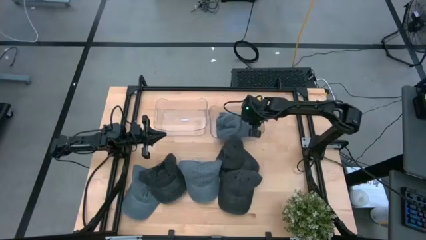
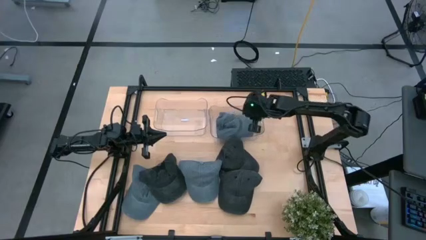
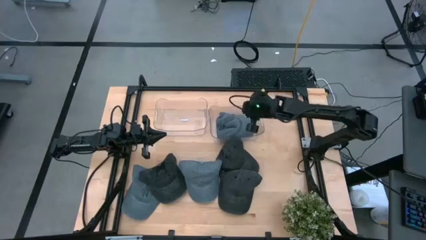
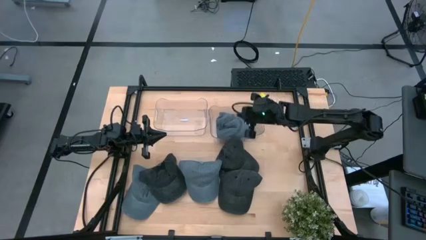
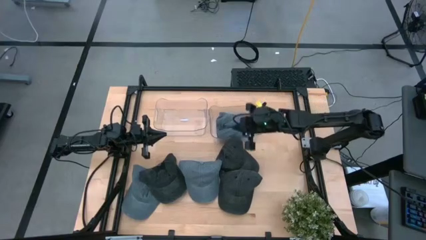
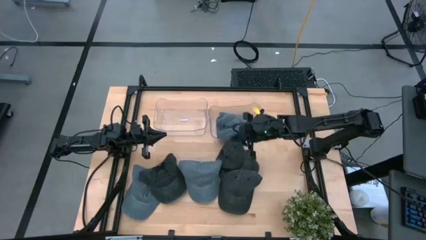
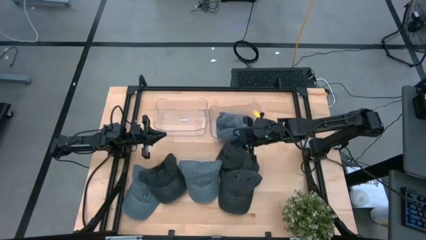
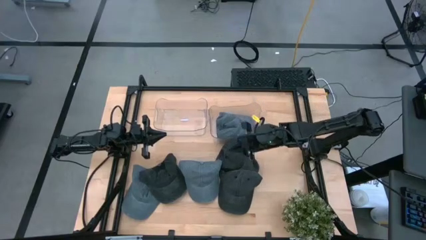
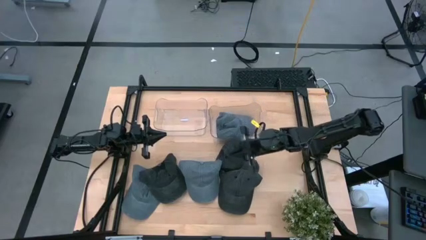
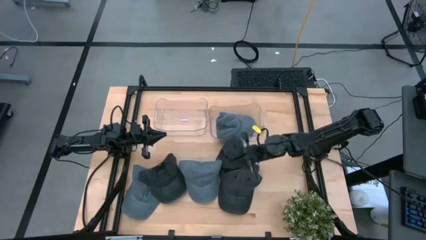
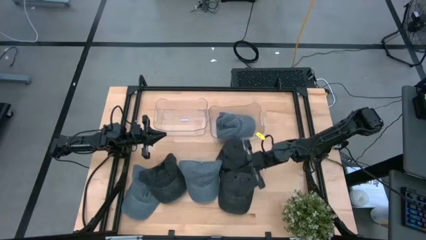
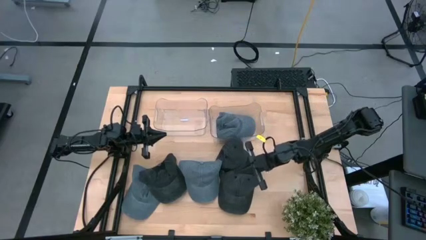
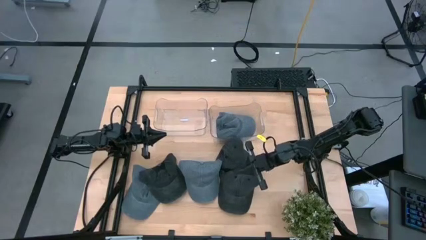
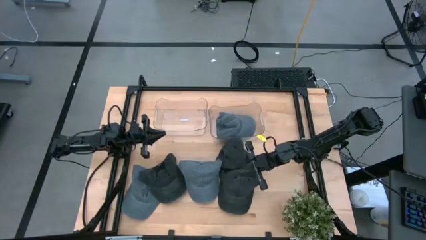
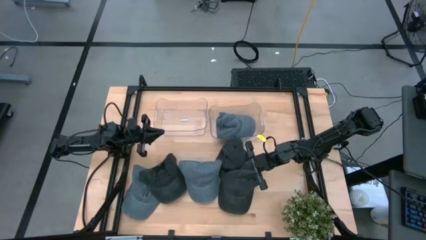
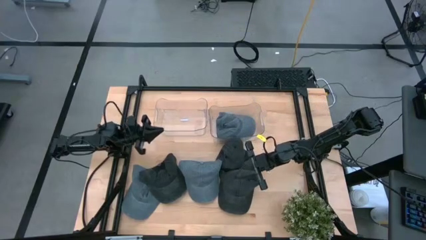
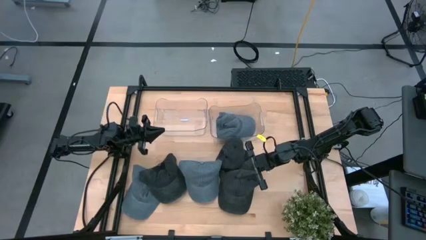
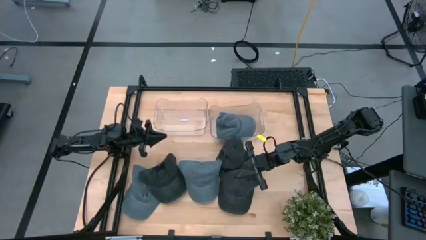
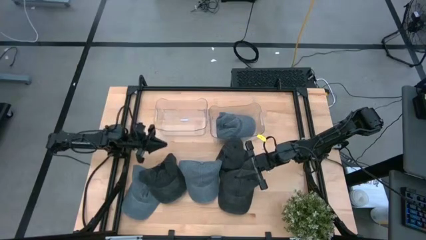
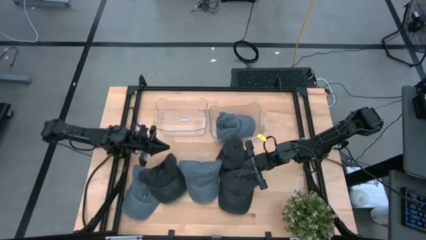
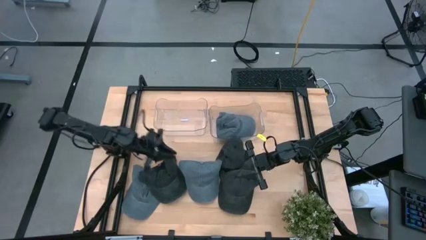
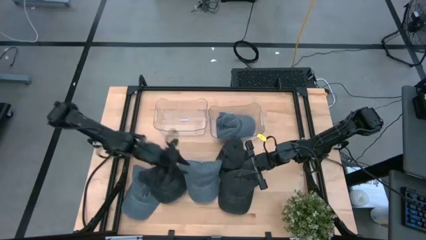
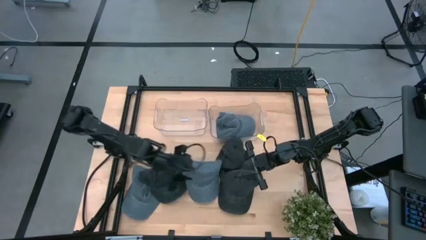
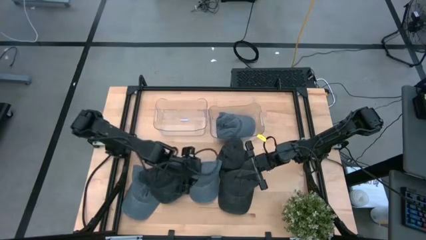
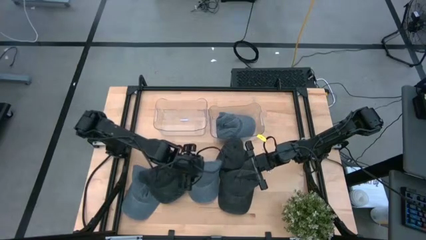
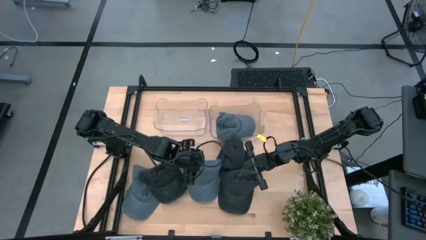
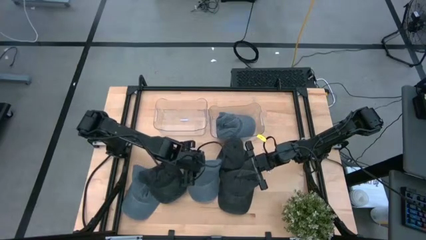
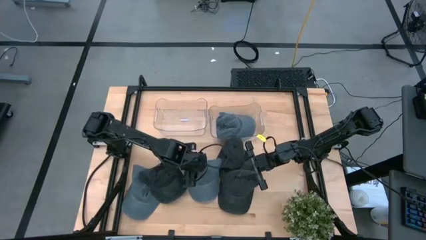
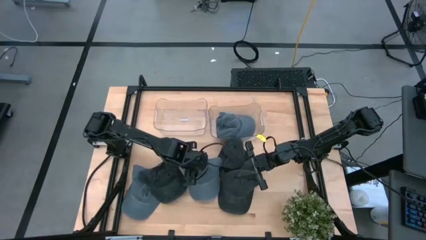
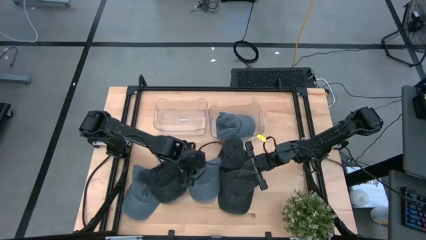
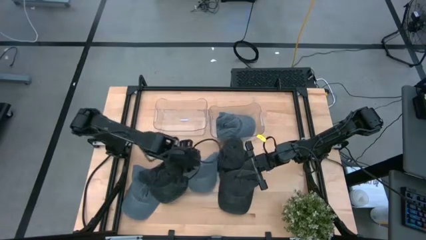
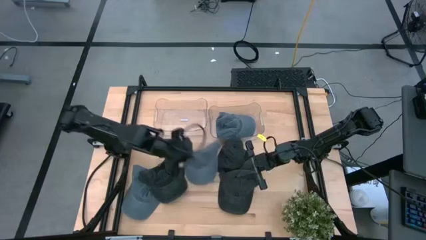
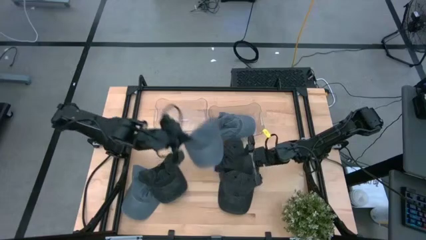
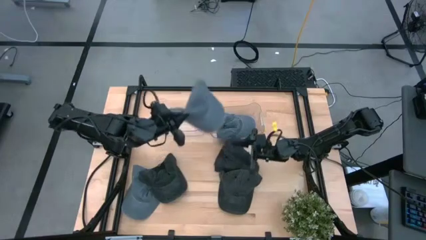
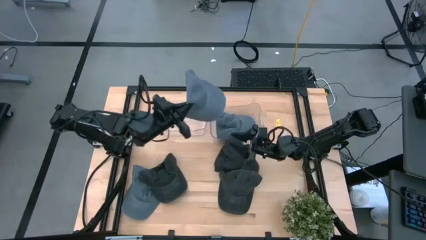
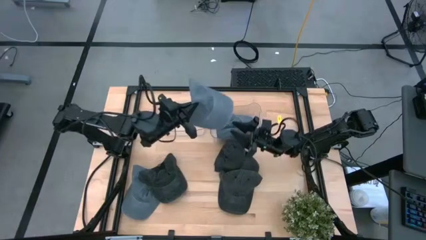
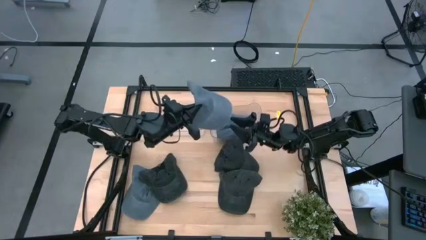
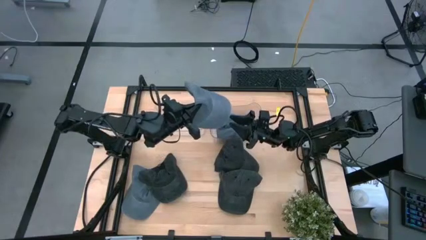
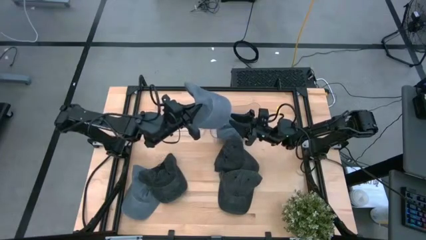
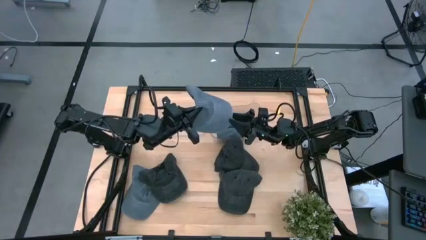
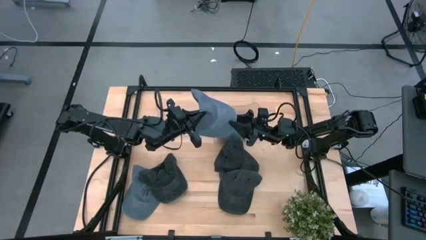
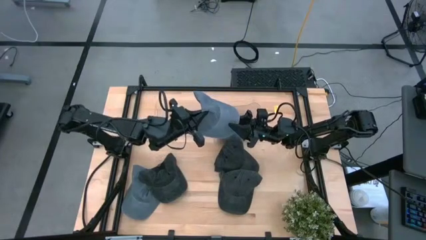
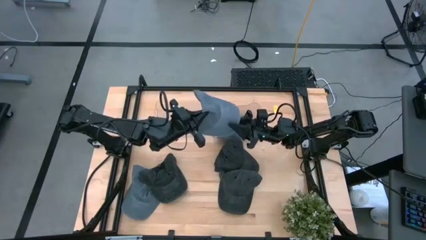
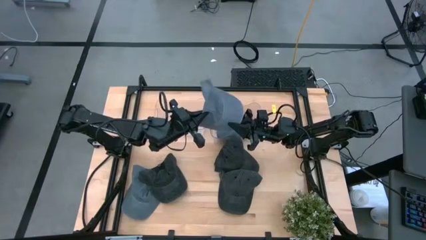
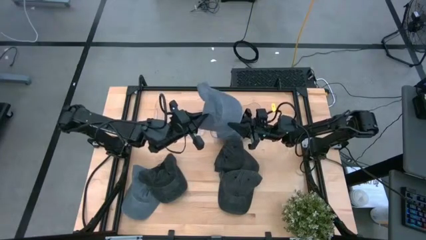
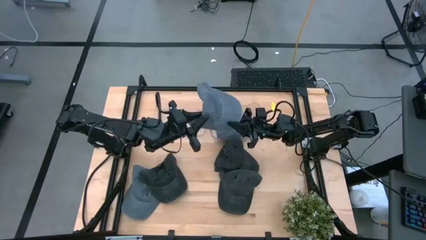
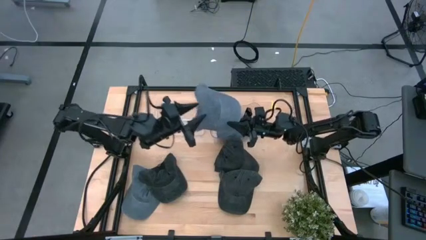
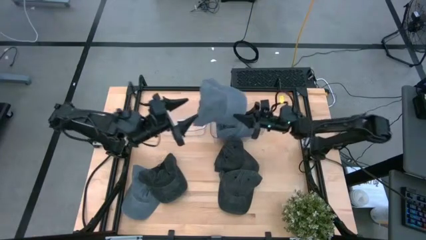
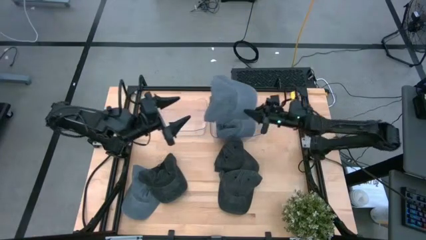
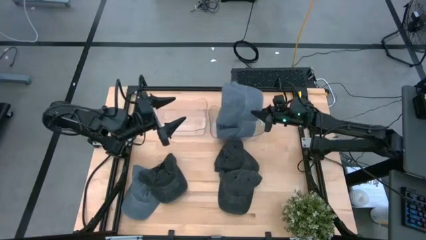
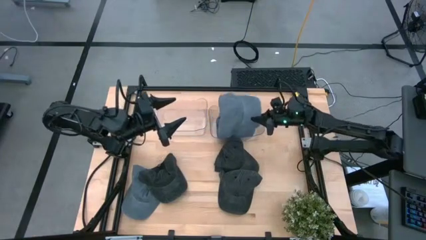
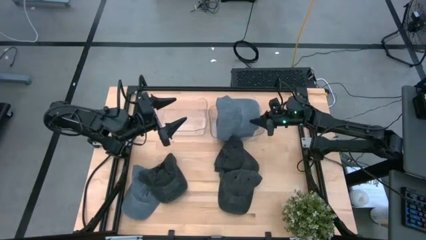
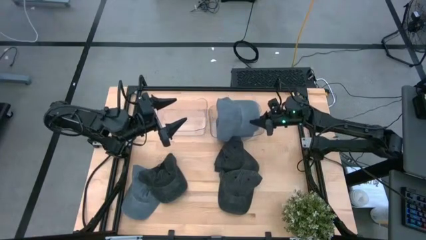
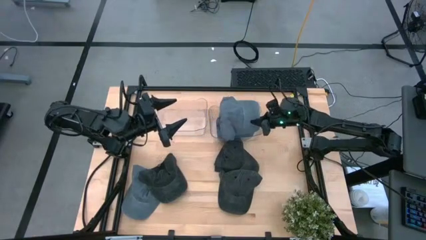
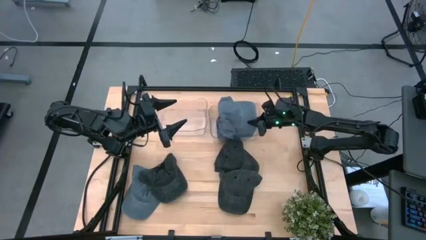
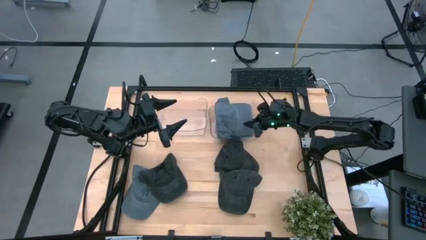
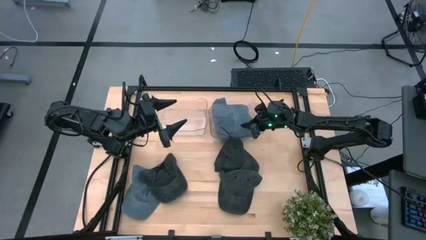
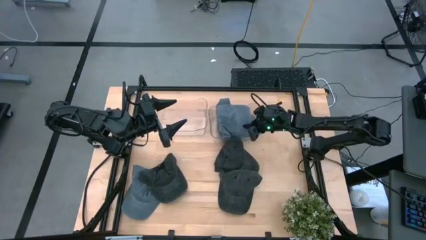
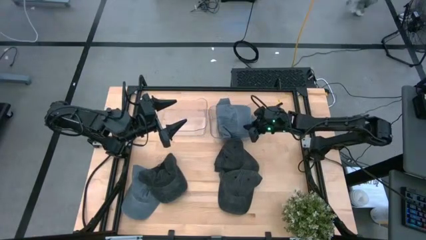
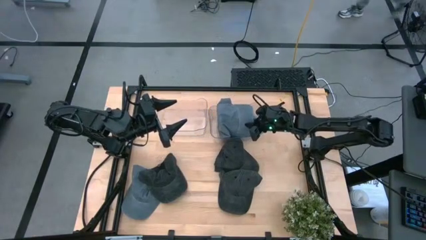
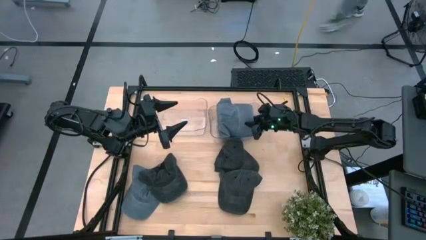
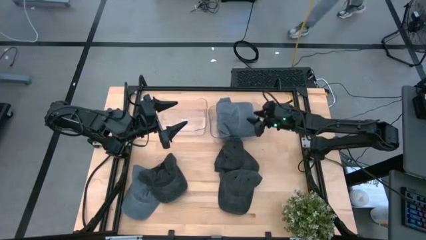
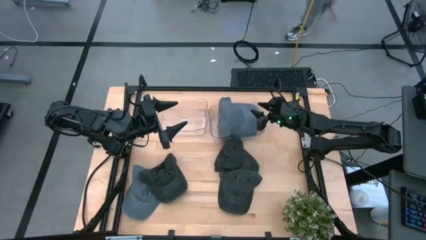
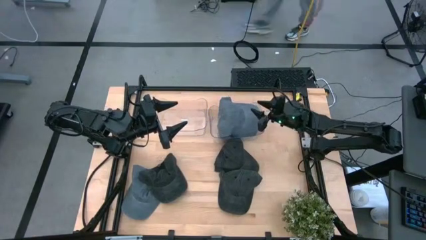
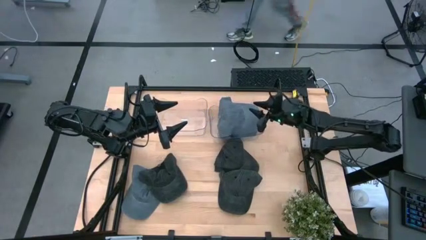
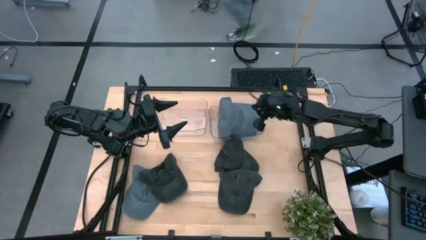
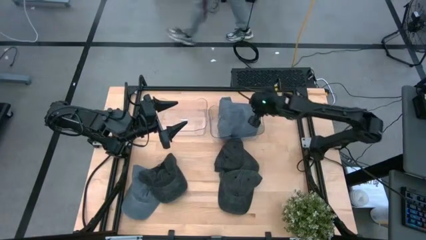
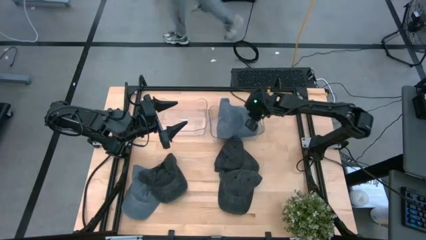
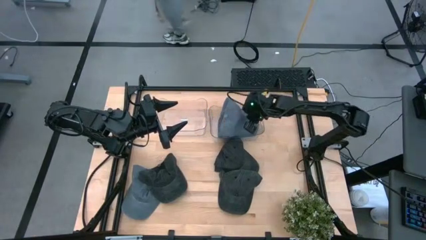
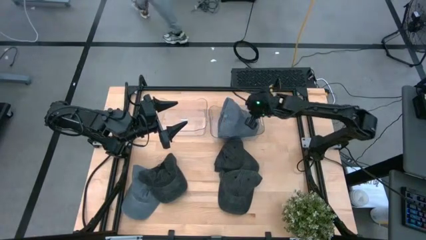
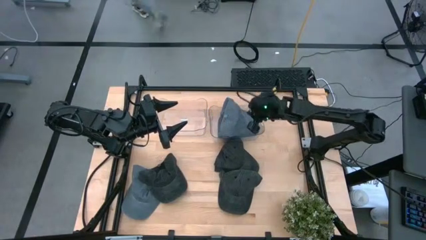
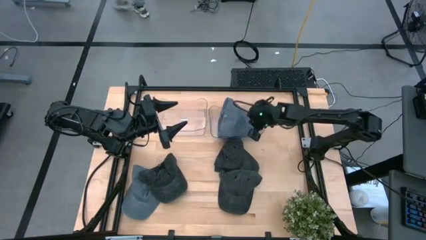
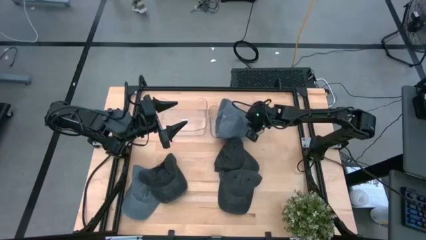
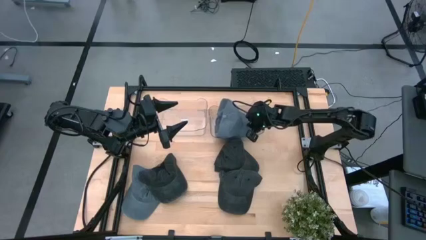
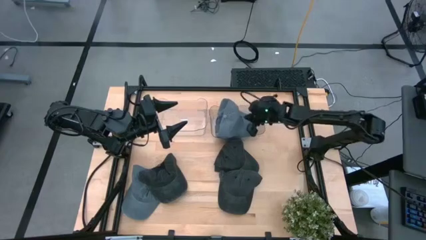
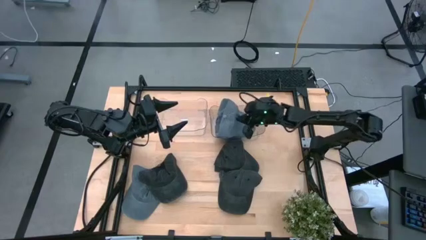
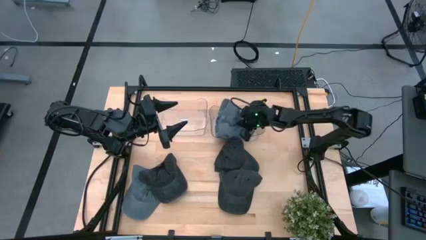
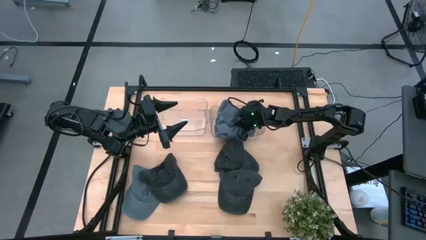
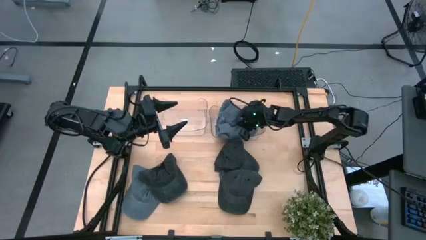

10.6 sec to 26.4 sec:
Task: Pick & Place hat
Put the right blue cap into the right transparent bin
